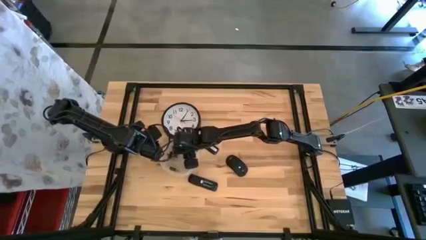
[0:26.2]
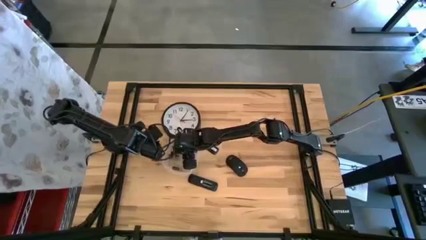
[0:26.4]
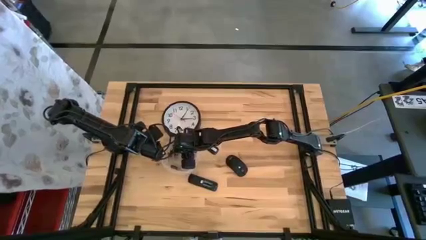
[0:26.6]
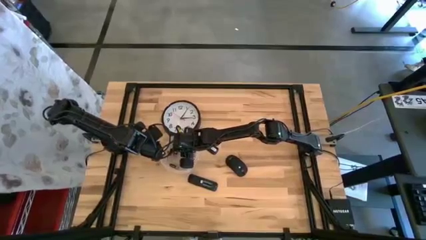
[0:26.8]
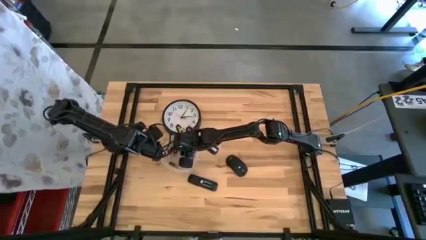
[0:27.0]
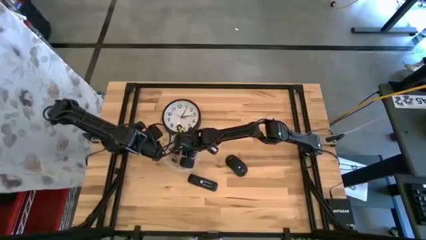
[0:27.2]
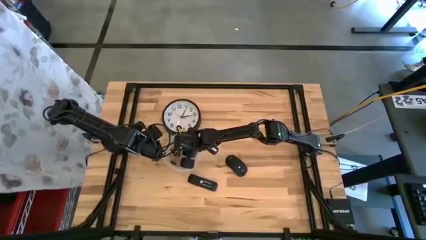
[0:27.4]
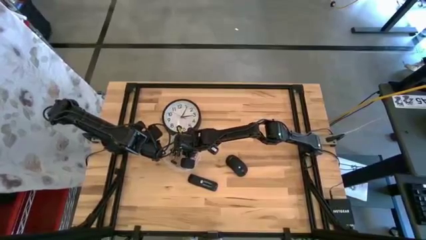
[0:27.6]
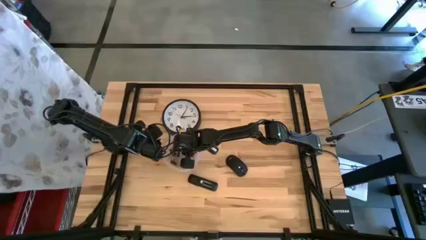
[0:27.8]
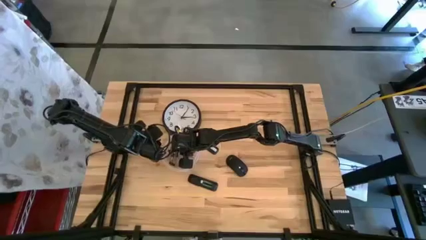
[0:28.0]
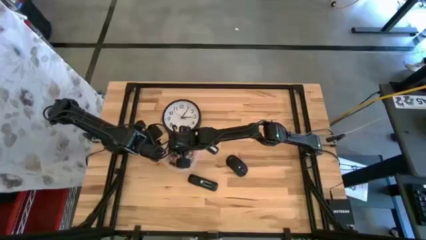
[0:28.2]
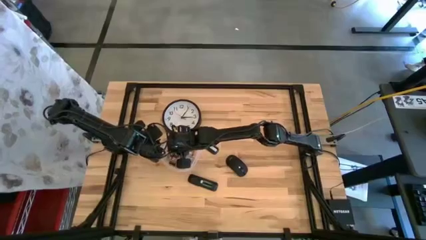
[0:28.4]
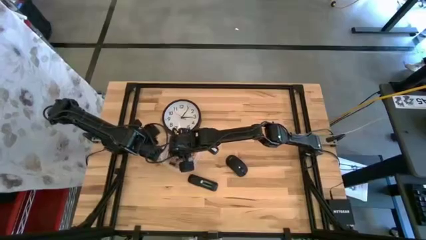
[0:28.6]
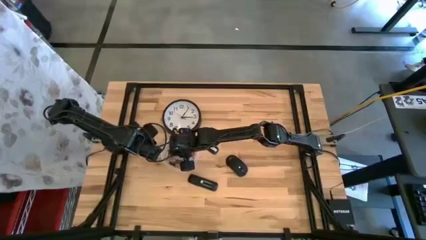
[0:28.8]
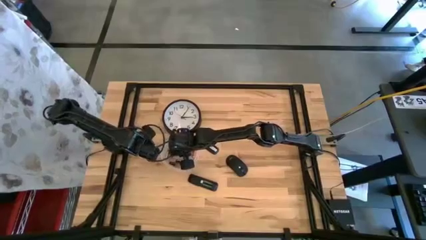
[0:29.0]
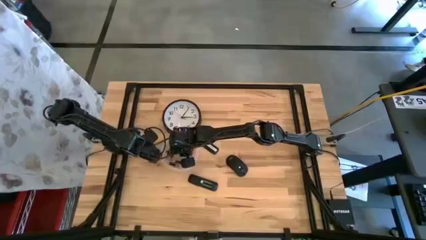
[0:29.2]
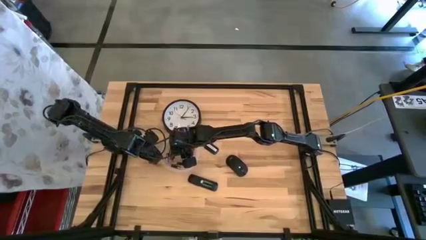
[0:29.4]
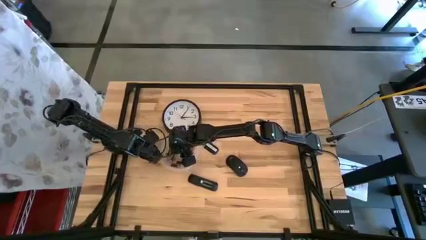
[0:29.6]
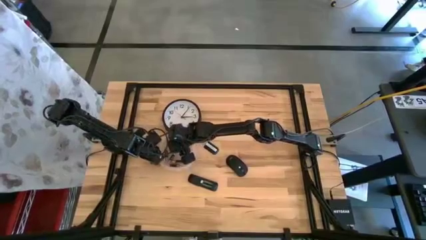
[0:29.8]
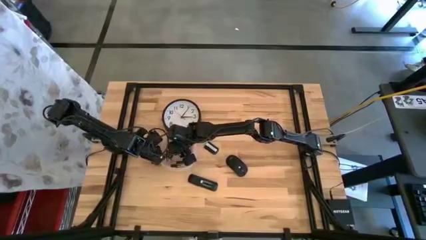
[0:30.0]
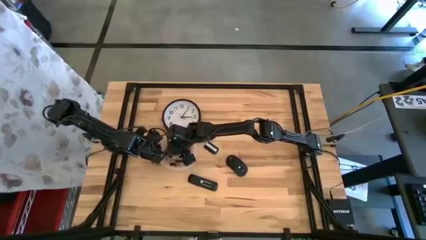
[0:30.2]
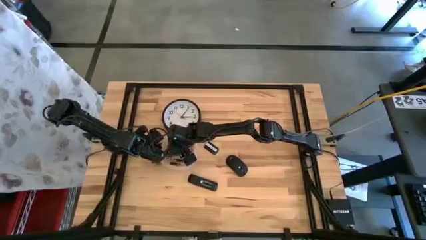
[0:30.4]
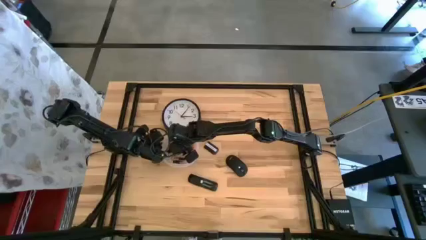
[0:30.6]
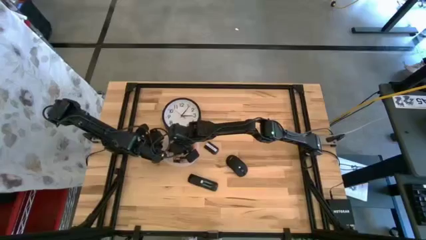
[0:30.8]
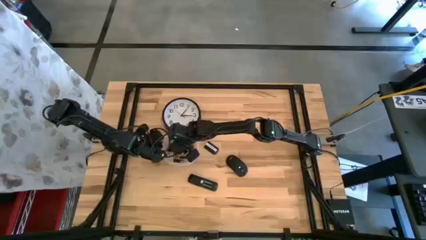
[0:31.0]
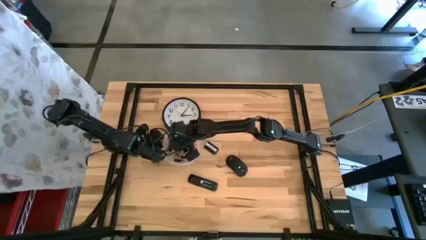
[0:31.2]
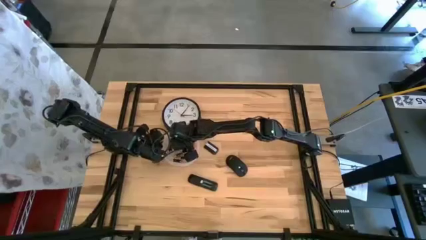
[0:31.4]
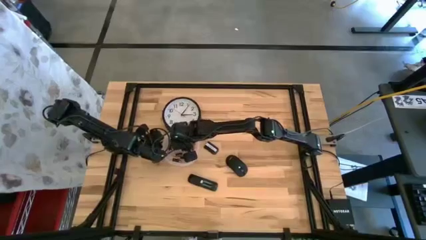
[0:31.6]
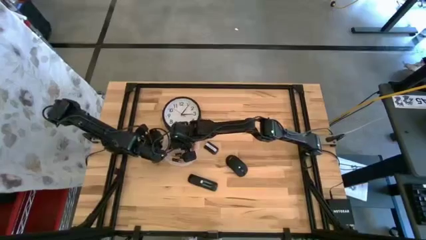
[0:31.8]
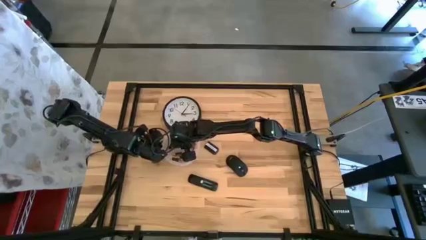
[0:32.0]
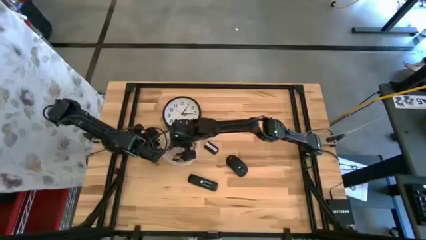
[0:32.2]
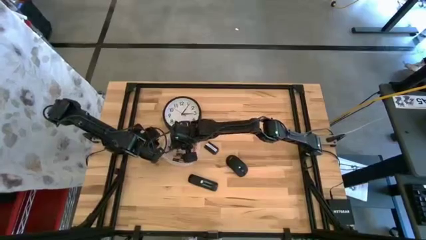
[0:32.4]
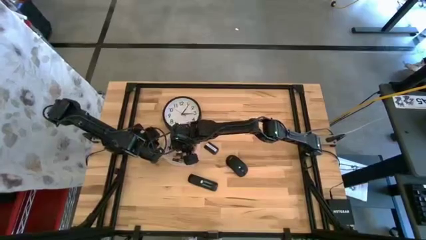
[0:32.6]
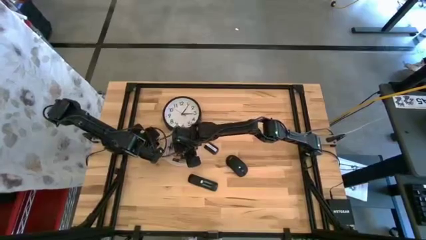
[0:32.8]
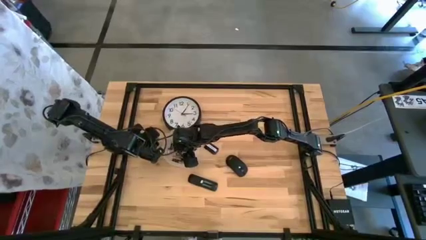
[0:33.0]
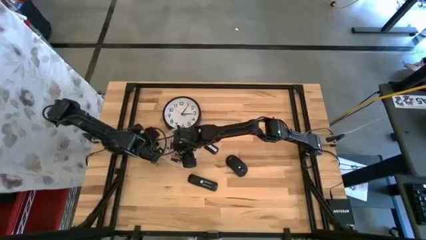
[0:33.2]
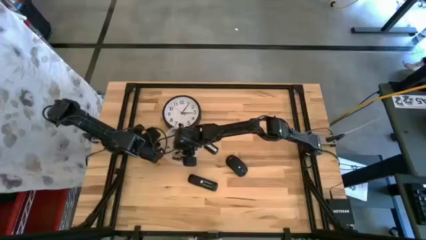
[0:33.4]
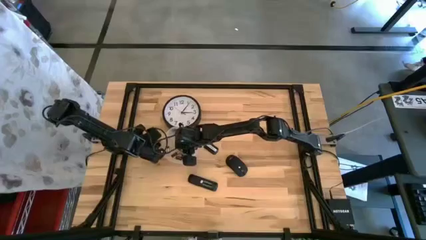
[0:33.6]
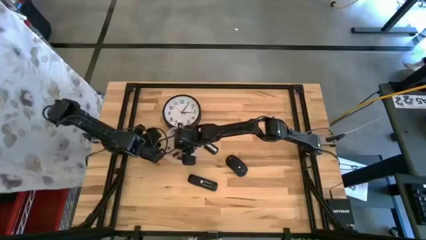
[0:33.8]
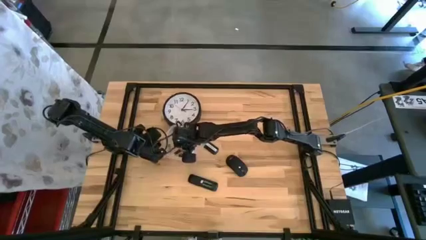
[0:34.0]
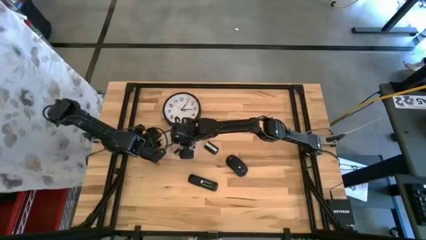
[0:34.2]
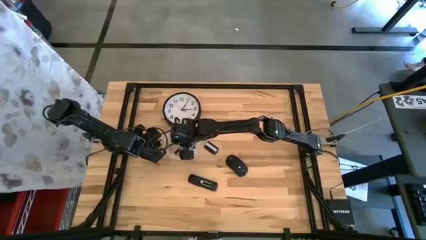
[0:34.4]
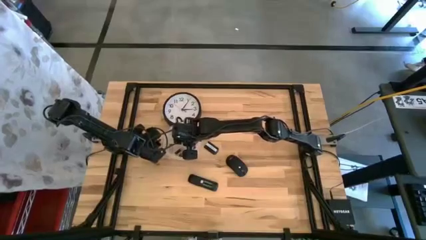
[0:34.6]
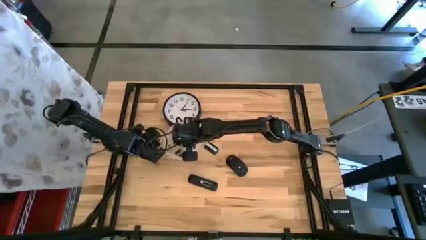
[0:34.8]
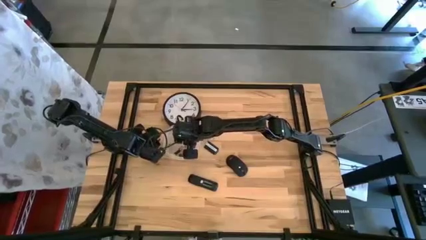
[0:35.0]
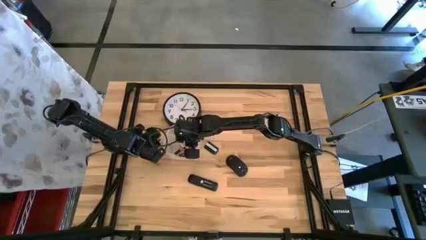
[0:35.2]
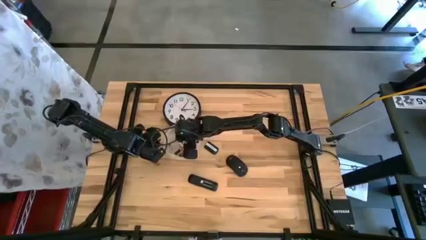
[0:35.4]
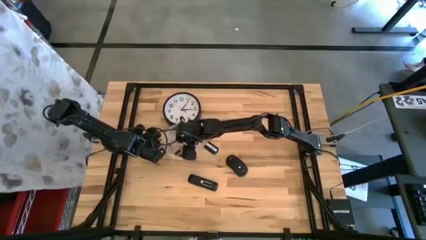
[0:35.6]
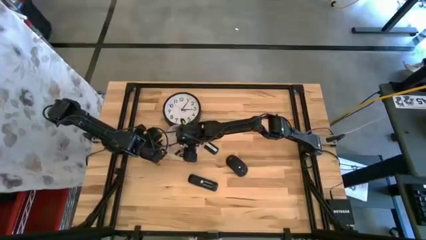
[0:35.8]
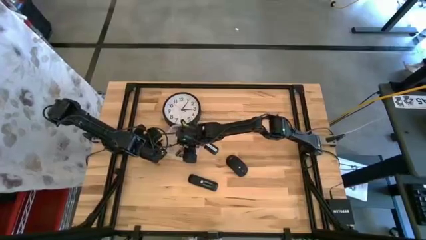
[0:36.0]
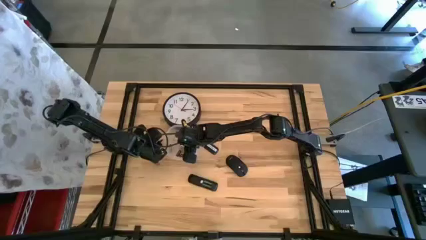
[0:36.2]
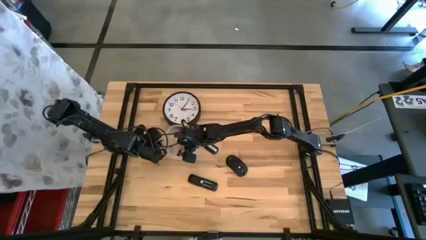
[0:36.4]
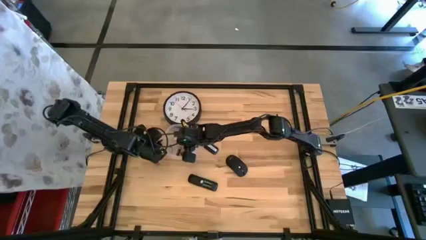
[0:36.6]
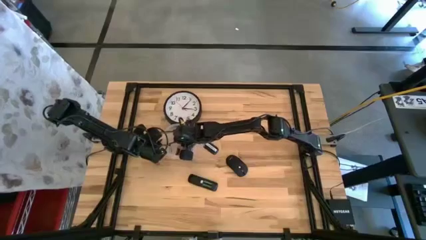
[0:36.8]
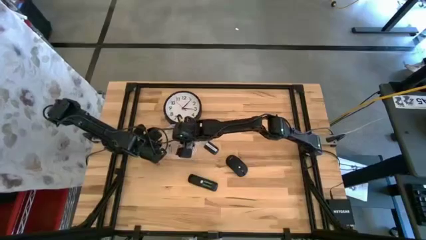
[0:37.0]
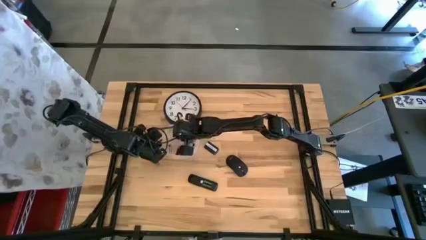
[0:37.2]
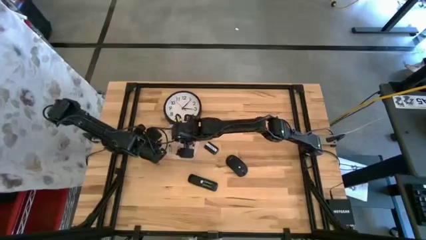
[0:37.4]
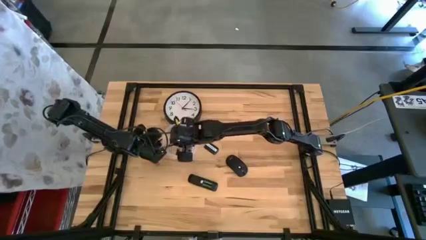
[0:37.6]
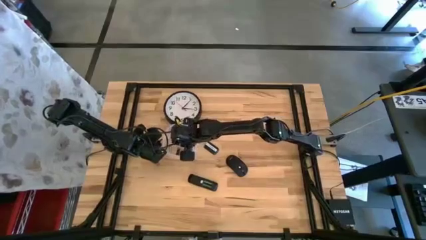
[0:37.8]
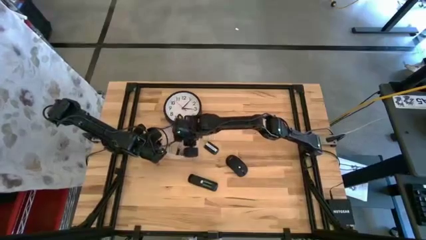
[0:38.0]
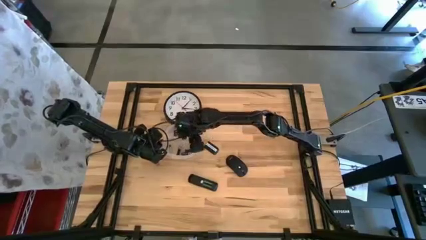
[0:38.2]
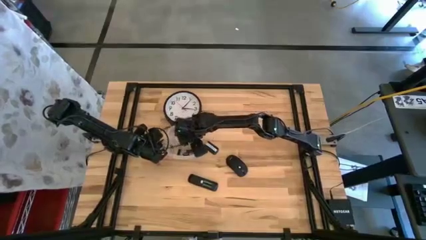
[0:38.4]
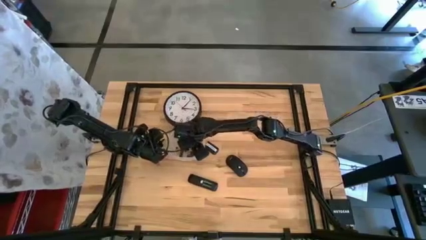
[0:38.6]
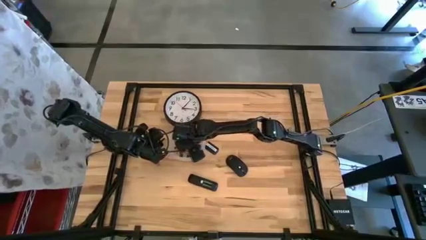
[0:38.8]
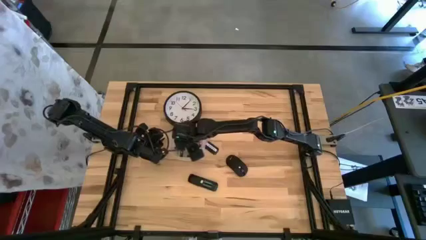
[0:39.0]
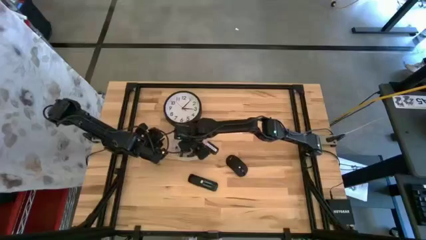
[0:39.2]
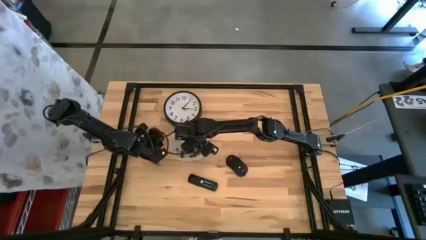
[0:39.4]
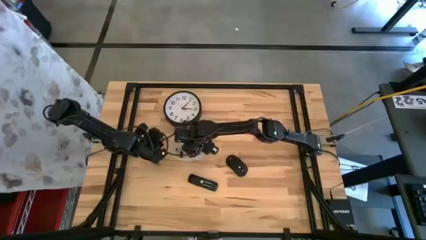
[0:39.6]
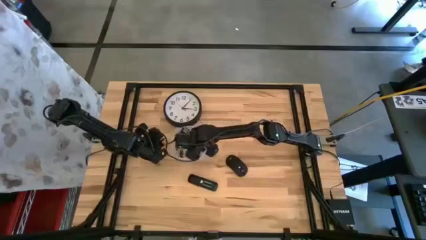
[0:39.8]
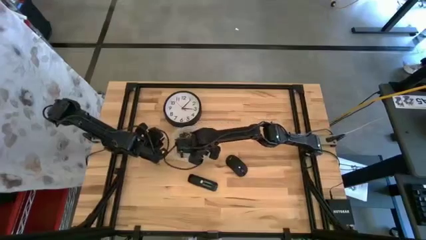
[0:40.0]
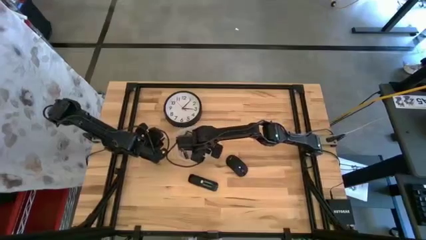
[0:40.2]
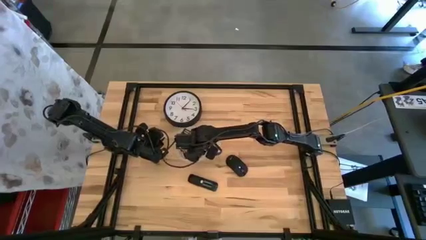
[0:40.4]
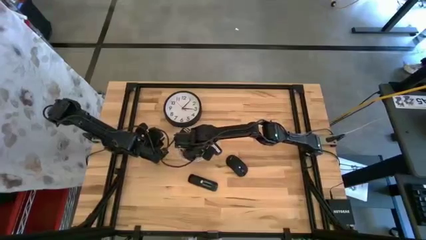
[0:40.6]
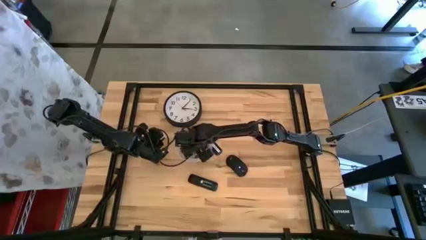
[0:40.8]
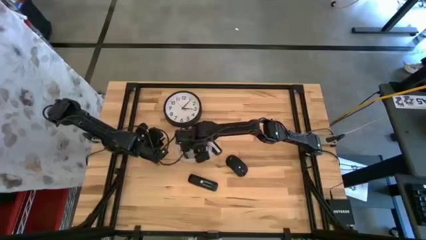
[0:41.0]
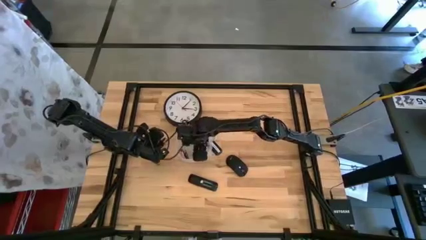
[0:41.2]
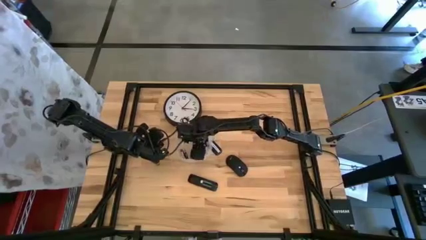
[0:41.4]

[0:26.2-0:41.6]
Task: Insert battery
Insert the silver battery into the remote control
